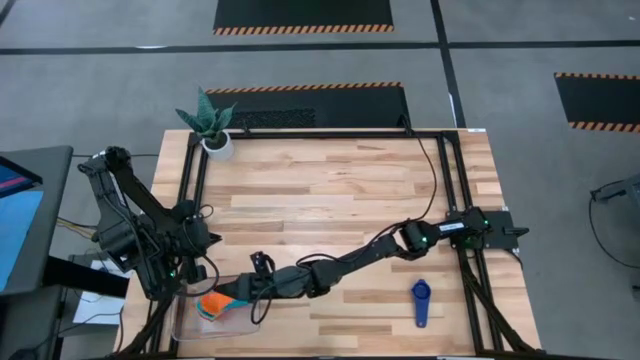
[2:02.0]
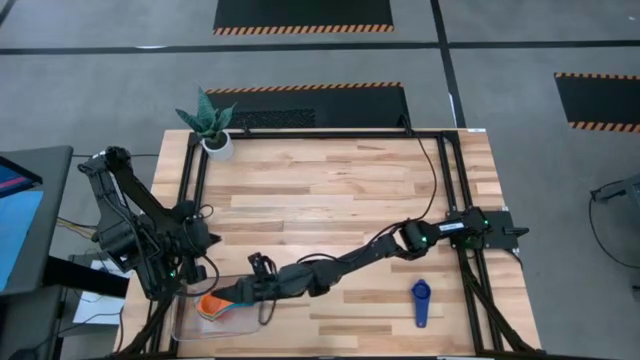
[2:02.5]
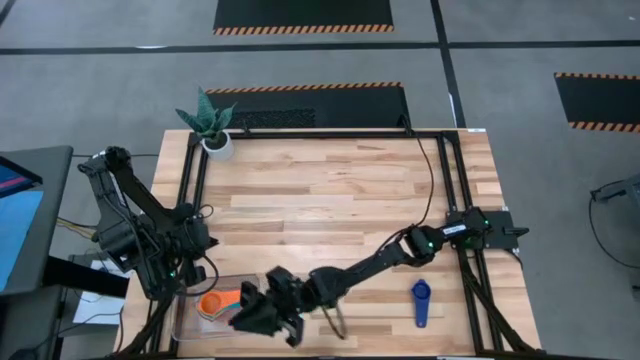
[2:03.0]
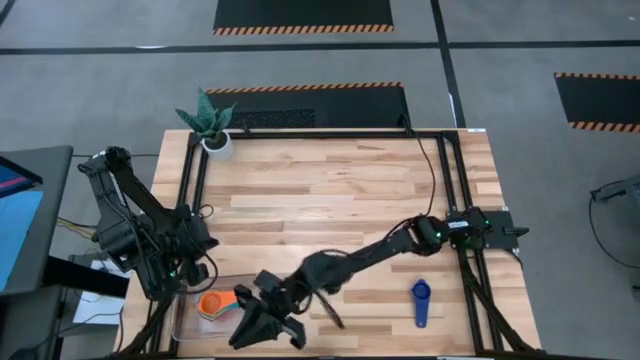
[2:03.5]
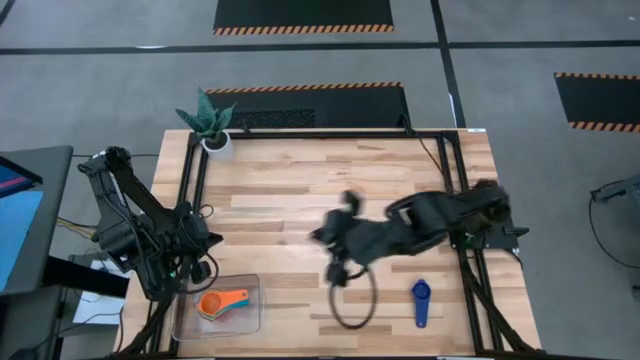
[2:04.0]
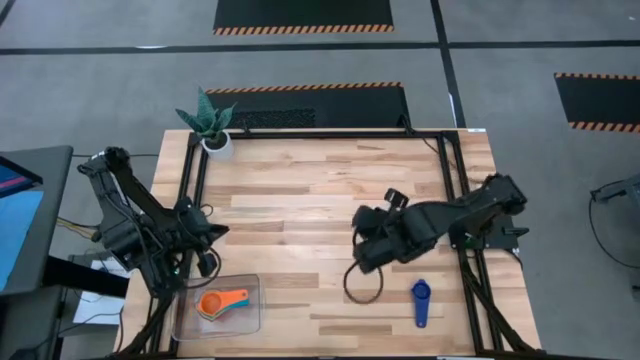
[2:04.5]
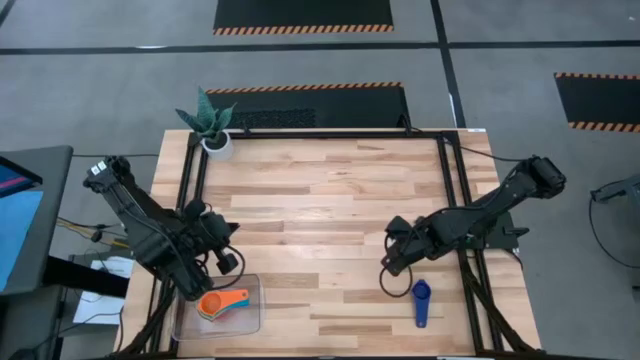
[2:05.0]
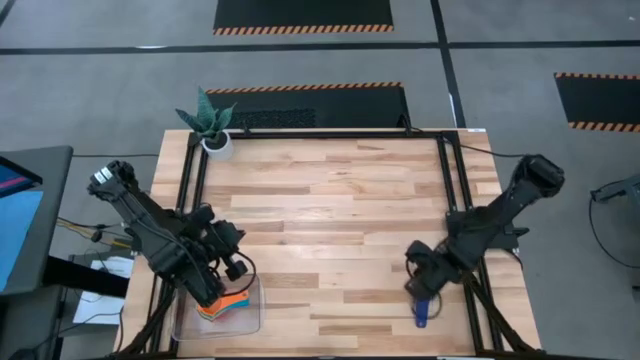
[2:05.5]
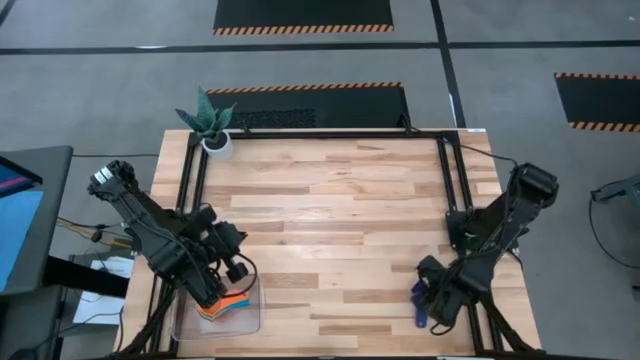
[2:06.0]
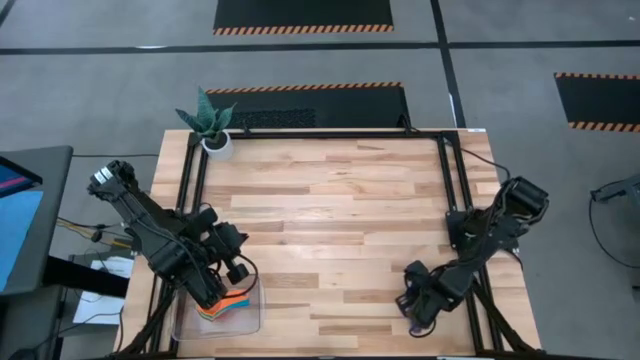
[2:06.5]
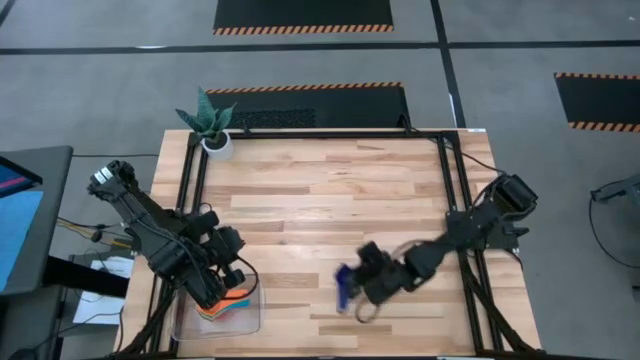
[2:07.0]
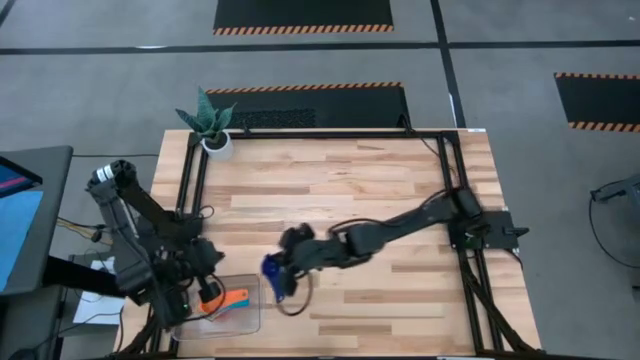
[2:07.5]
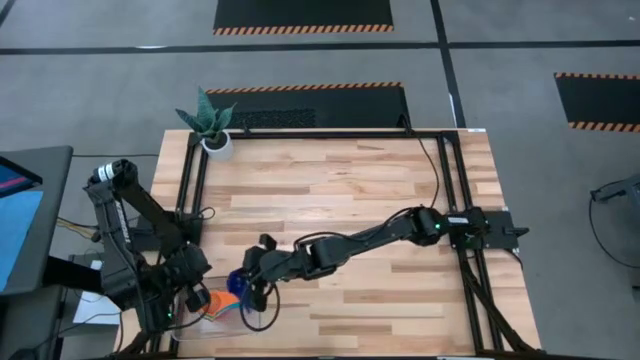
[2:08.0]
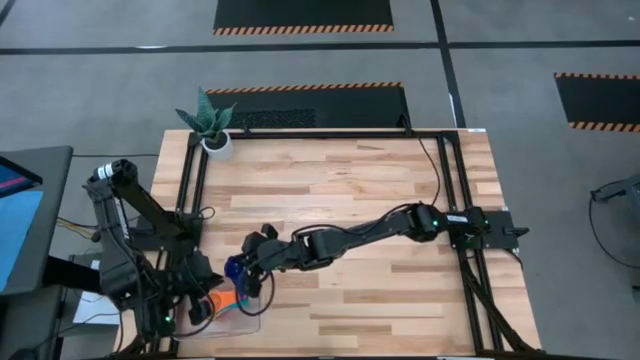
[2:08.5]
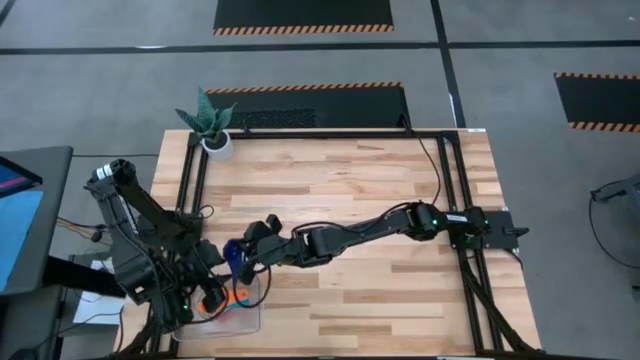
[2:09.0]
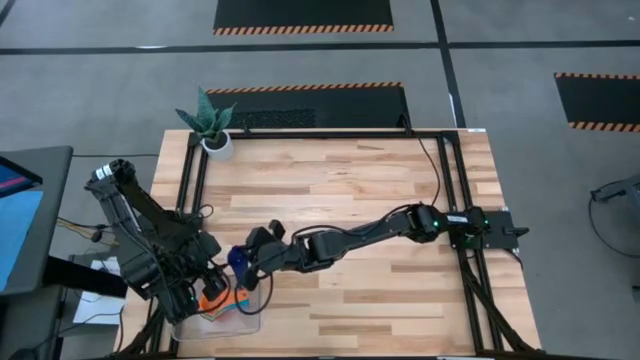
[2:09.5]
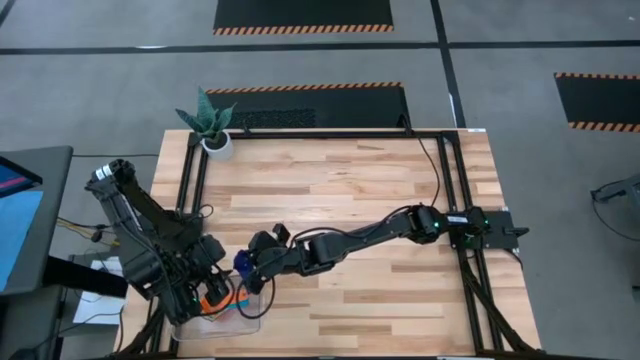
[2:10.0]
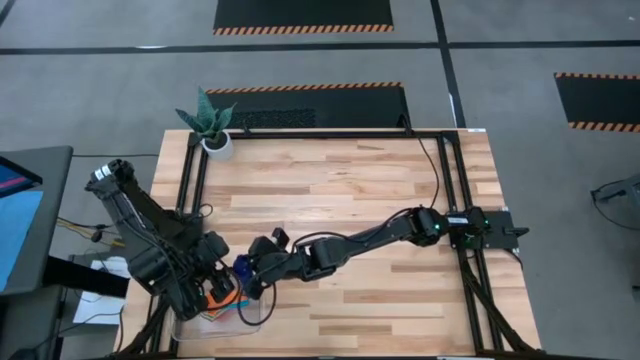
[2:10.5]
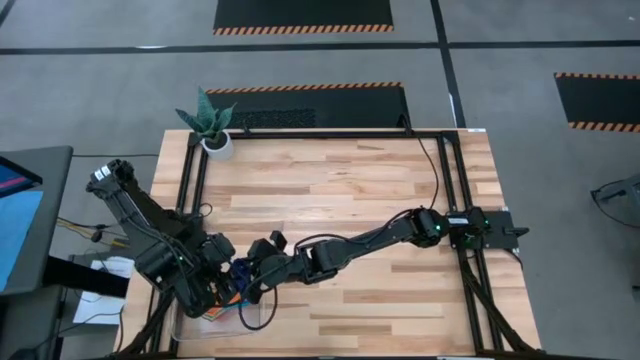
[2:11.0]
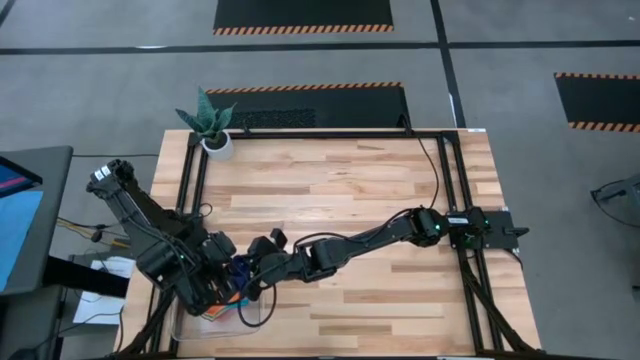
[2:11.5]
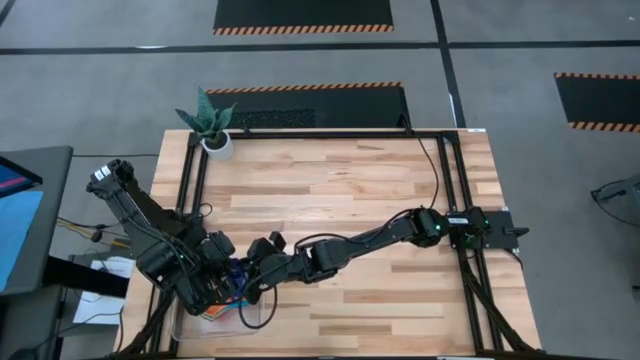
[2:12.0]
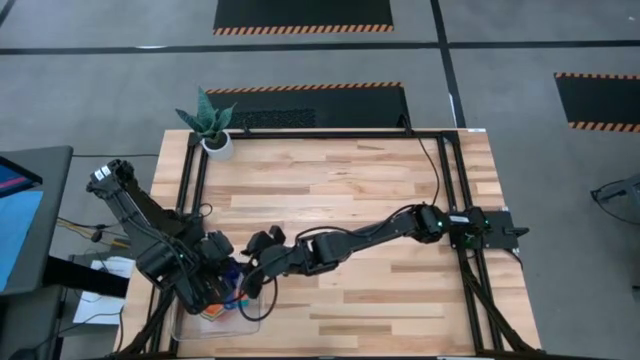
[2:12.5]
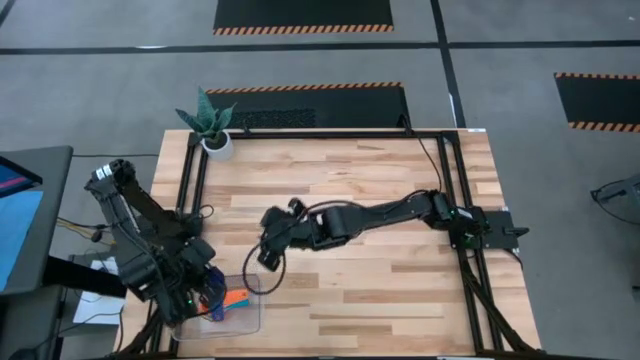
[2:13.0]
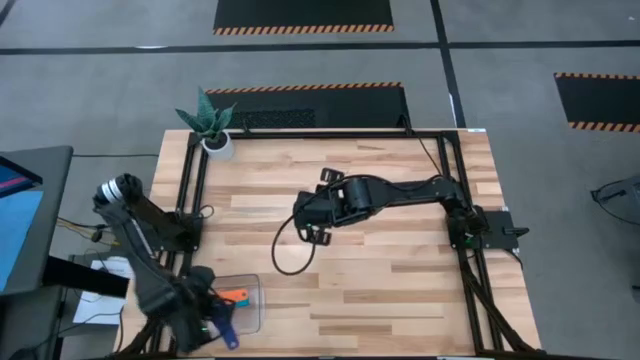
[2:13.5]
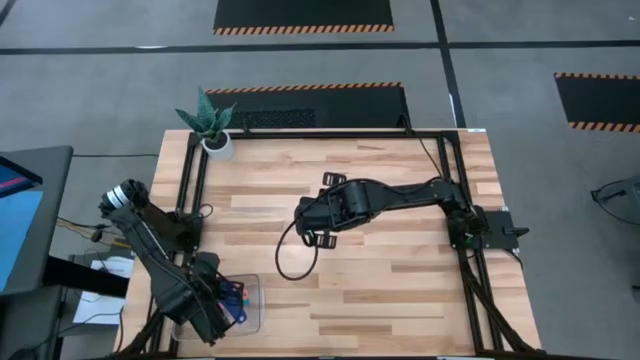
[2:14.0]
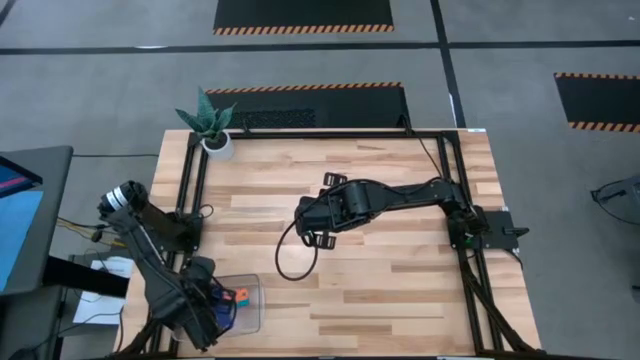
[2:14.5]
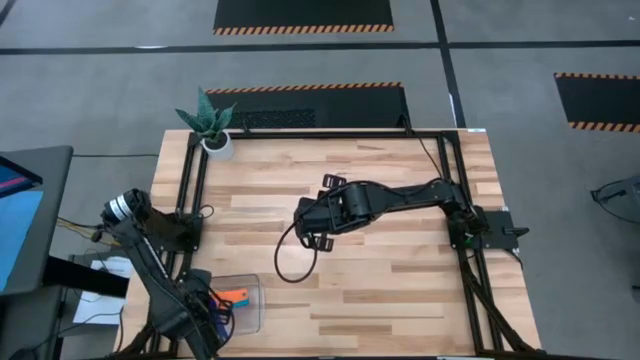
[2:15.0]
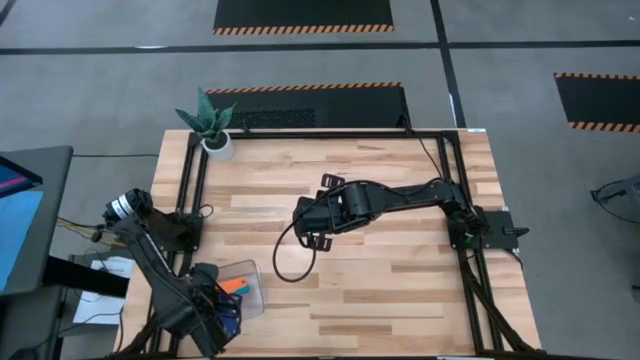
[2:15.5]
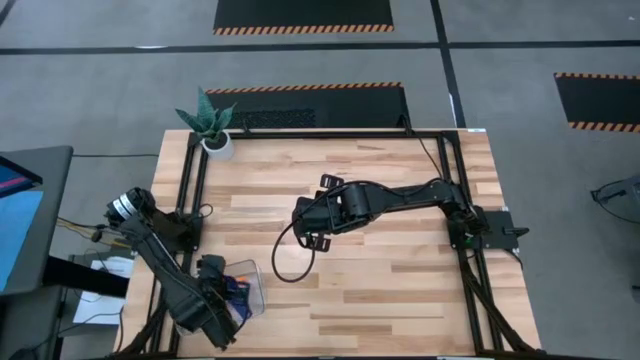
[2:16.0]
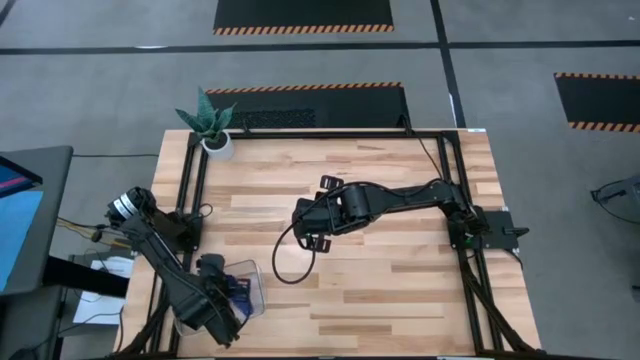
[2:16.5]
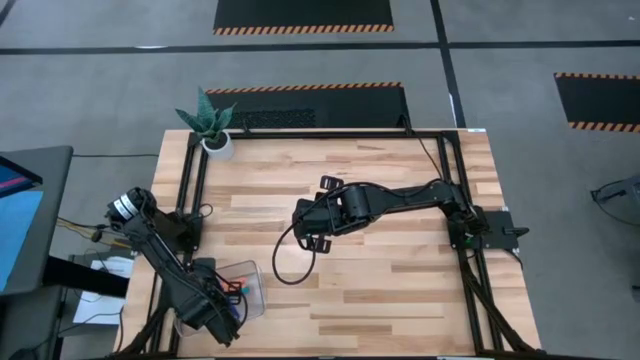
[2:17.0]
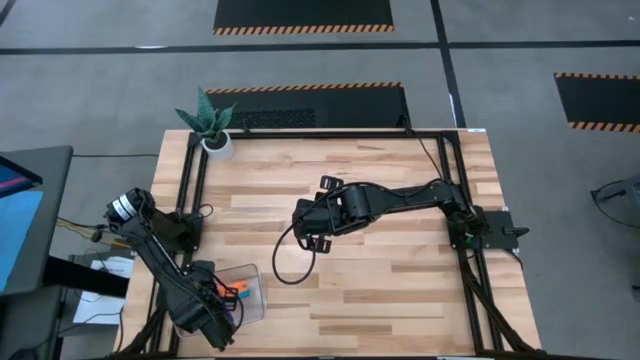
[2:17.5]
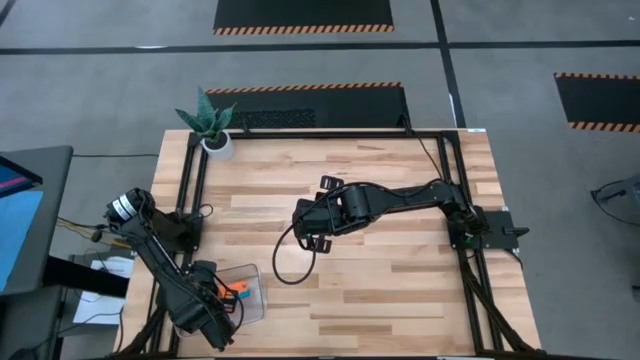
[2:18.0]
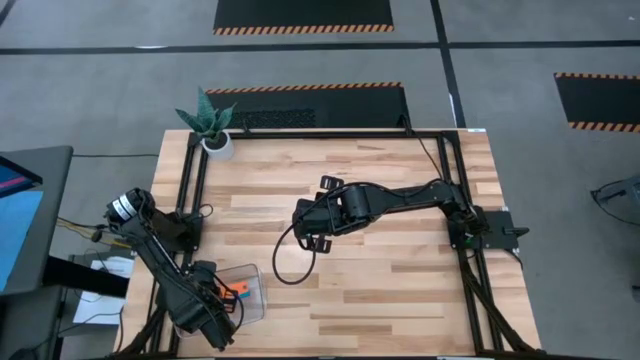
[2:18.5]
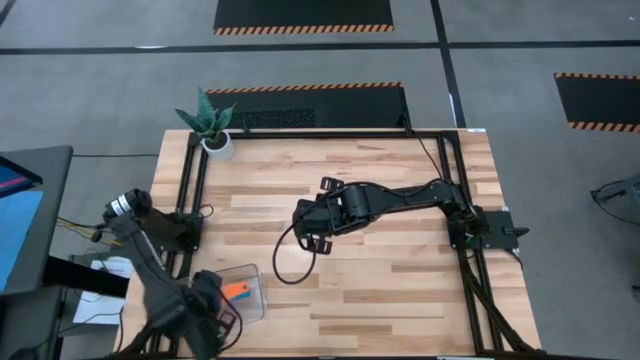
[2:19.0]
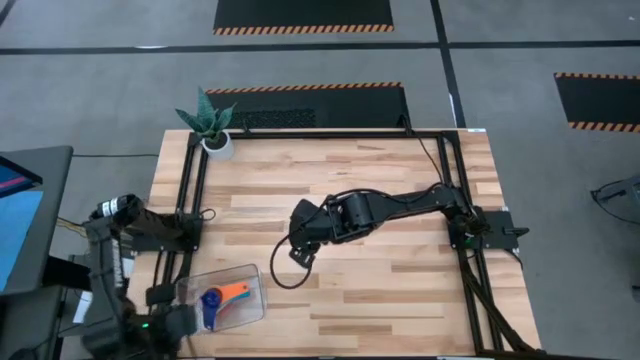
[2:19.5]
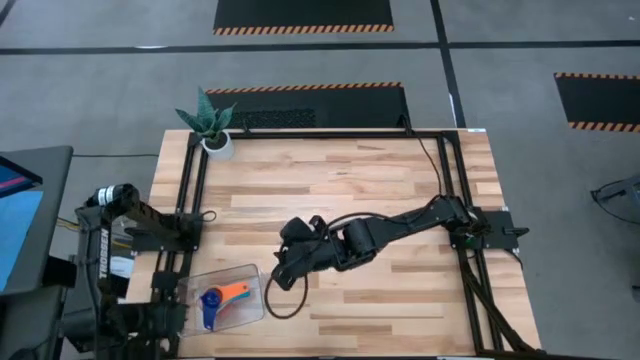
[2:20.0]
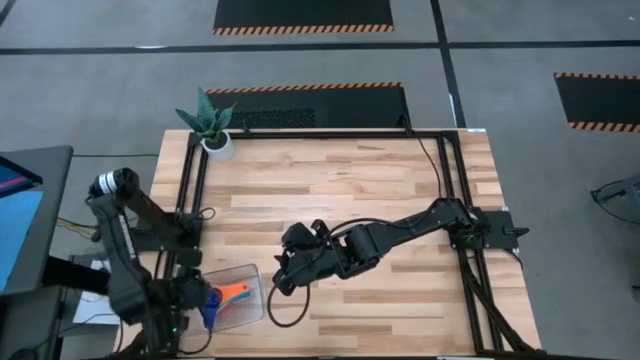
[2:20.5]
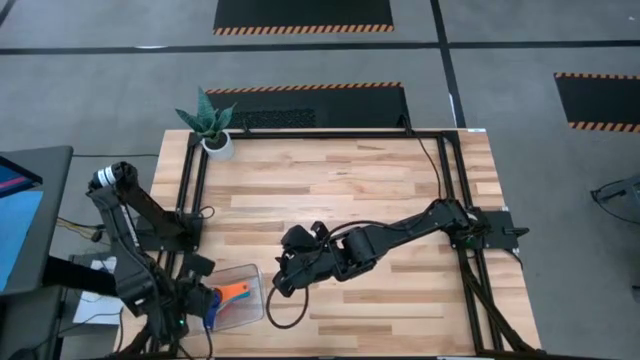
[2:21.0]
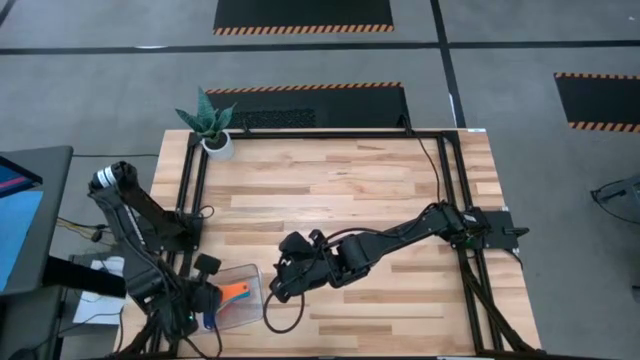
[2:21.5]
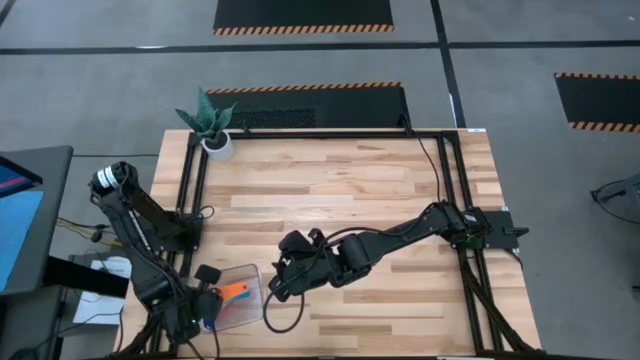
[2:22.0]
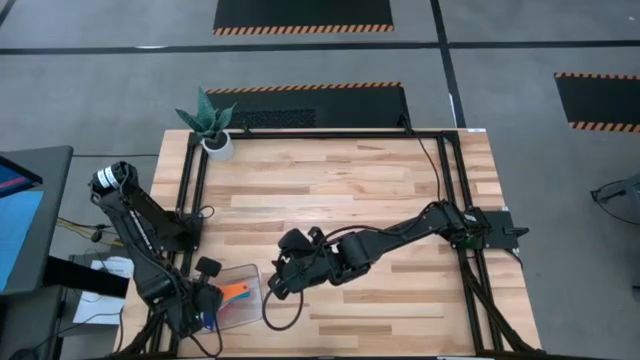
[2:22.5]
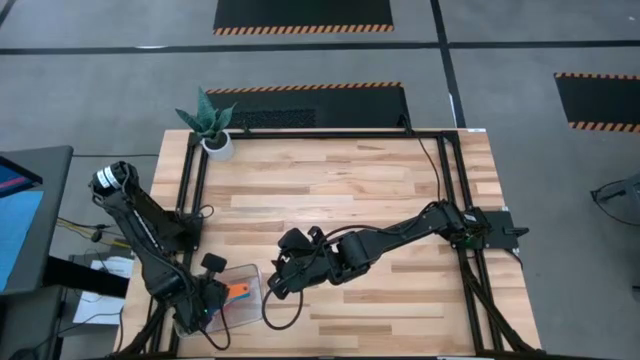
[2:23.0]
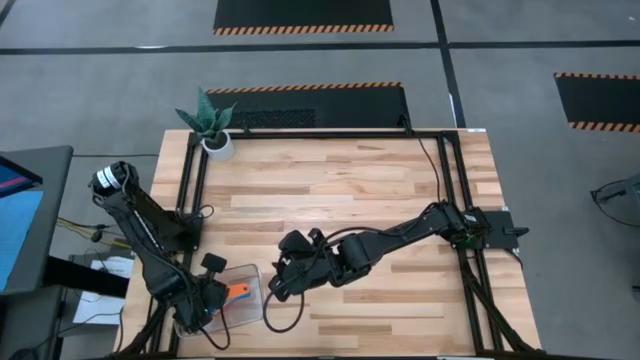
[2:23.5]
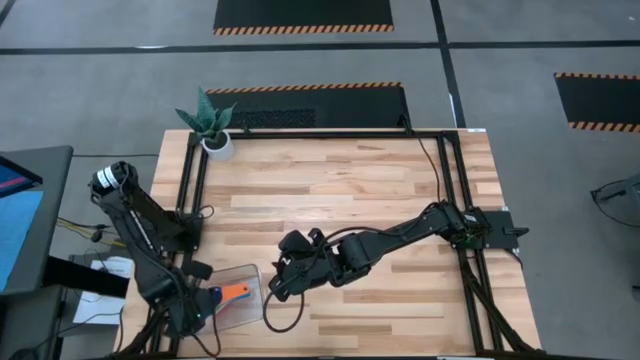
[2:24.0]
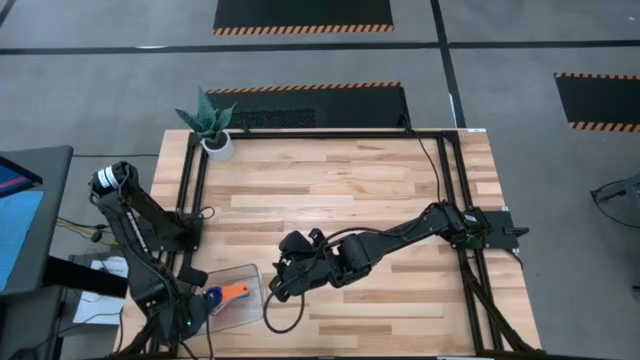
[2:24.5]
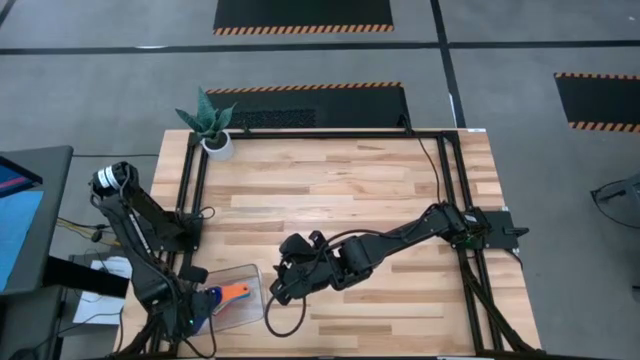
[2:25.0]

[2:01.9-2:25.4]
Task: Nest measuring cups in basket
Stack the dark blue measuring cup on top of the orange measuring cup in the transparent bin
